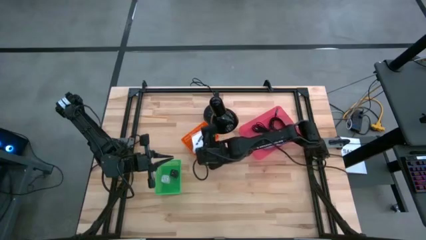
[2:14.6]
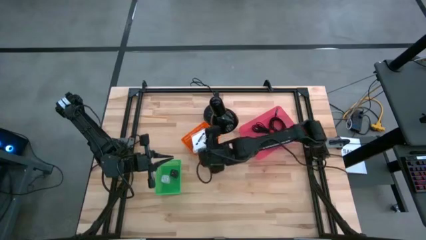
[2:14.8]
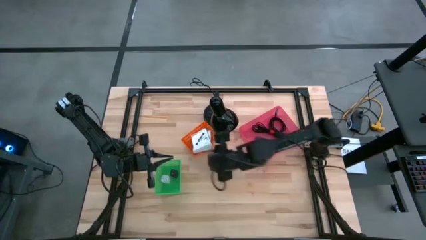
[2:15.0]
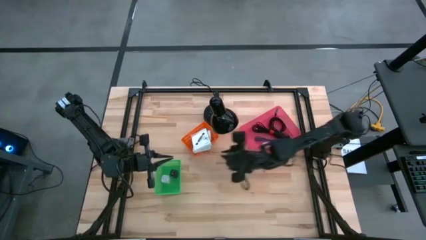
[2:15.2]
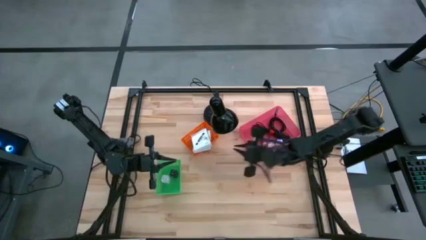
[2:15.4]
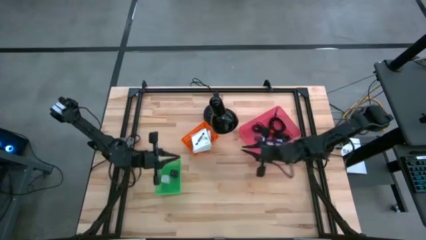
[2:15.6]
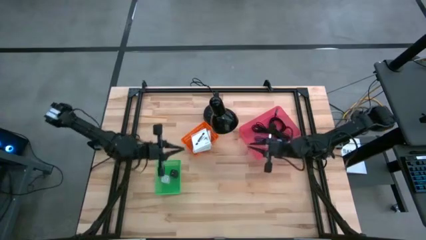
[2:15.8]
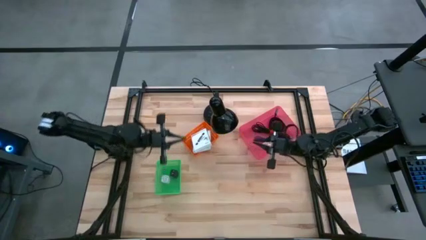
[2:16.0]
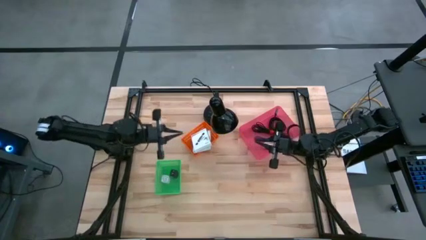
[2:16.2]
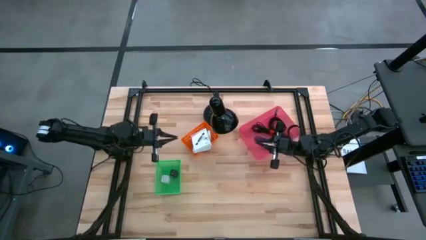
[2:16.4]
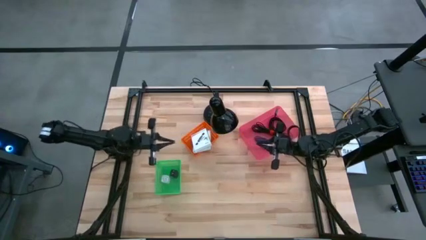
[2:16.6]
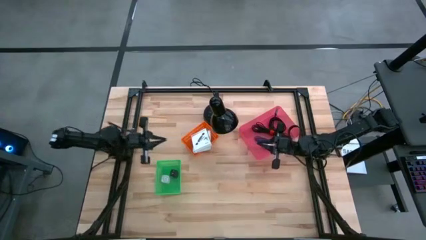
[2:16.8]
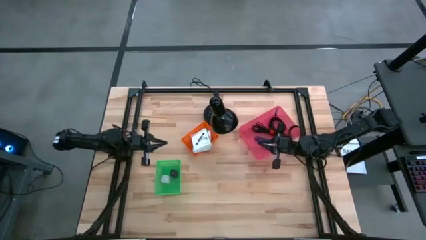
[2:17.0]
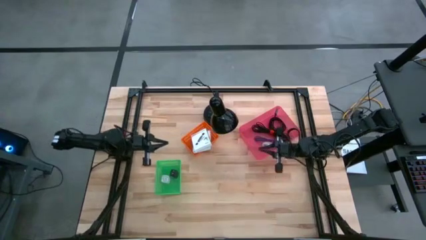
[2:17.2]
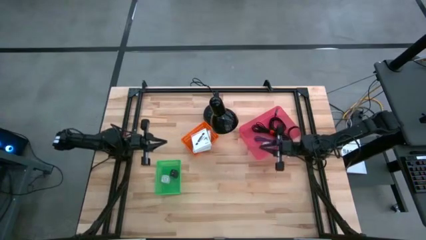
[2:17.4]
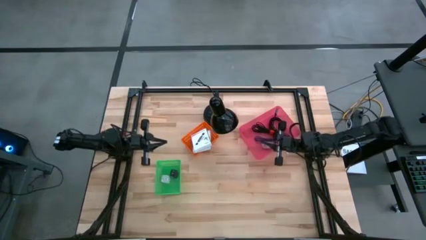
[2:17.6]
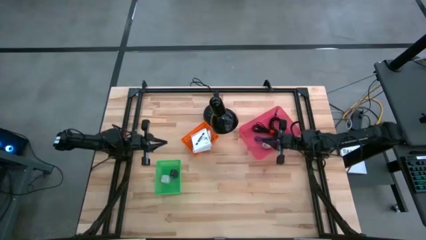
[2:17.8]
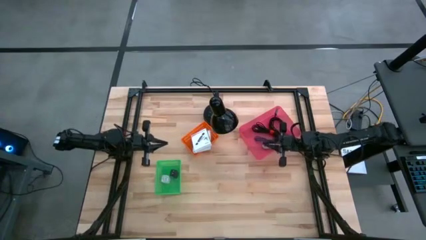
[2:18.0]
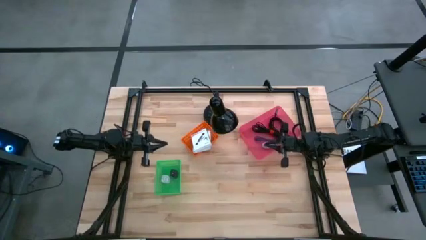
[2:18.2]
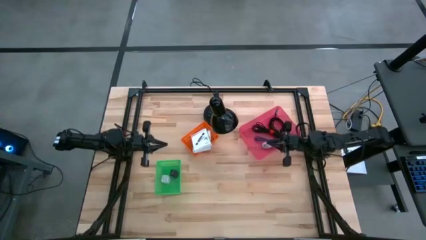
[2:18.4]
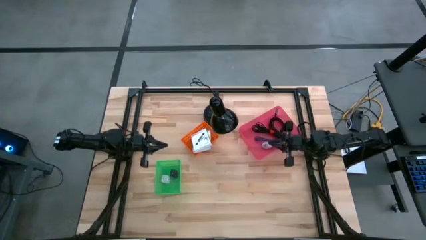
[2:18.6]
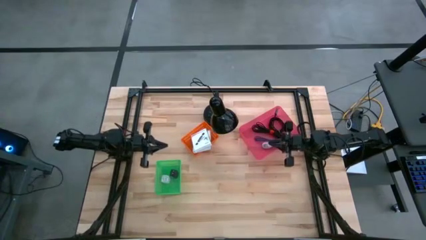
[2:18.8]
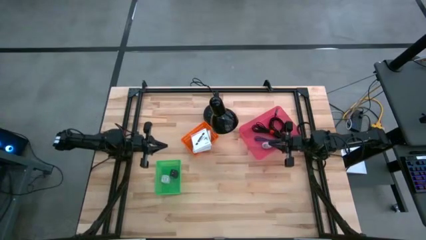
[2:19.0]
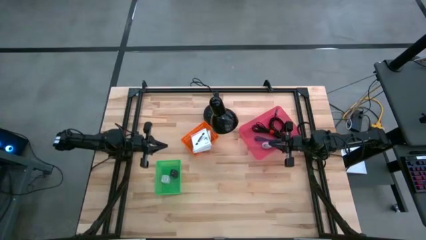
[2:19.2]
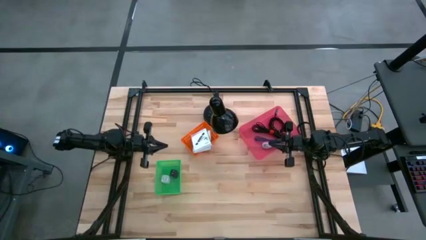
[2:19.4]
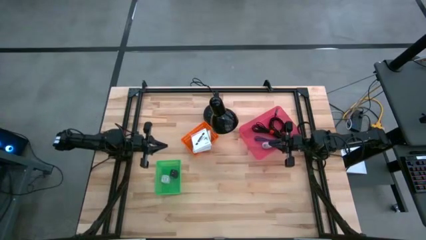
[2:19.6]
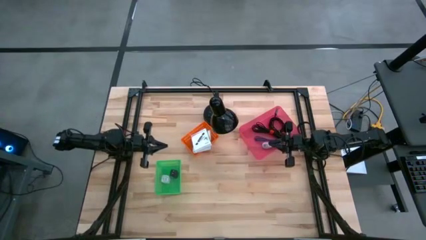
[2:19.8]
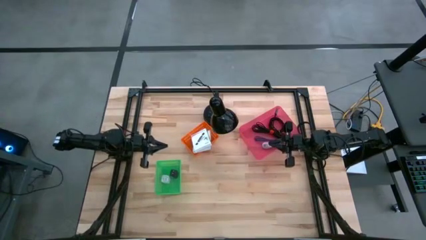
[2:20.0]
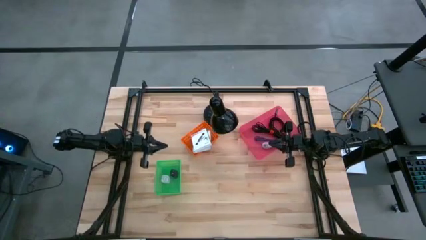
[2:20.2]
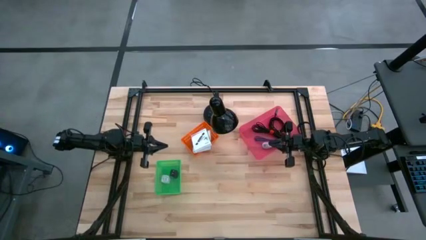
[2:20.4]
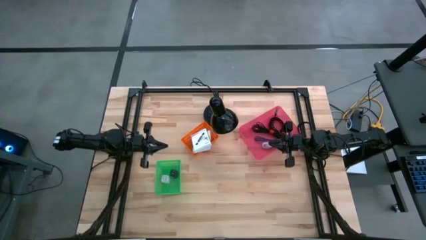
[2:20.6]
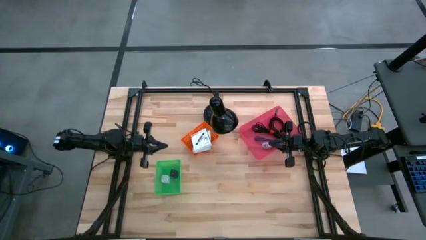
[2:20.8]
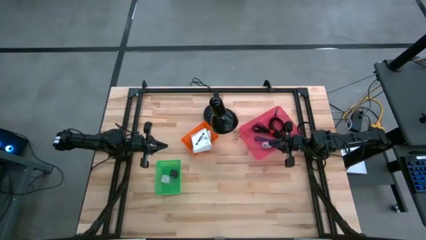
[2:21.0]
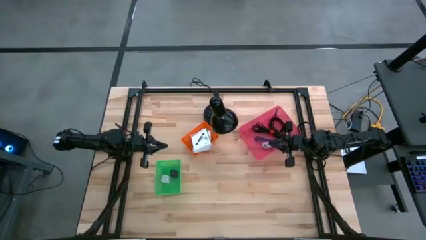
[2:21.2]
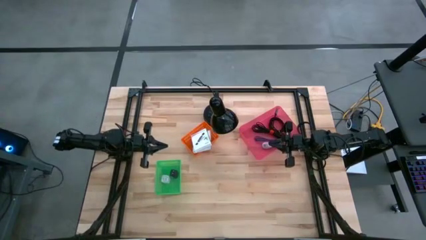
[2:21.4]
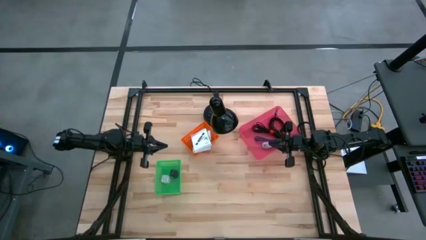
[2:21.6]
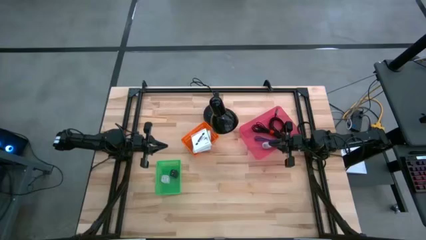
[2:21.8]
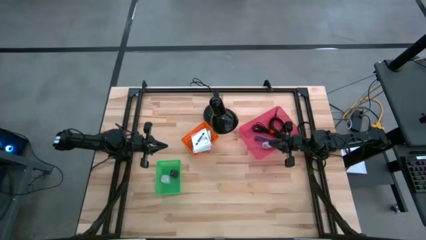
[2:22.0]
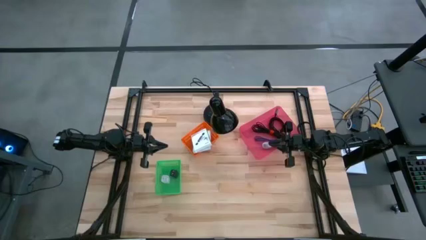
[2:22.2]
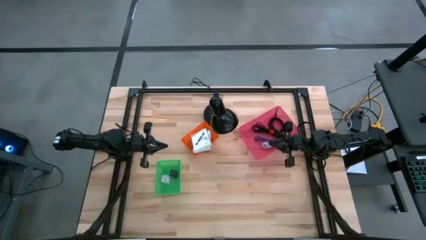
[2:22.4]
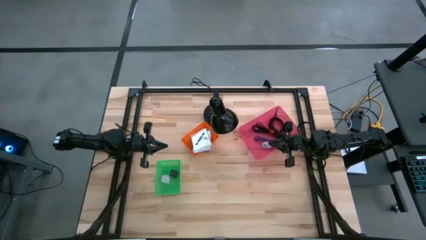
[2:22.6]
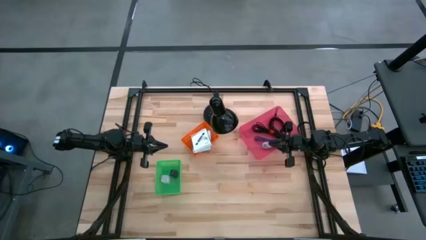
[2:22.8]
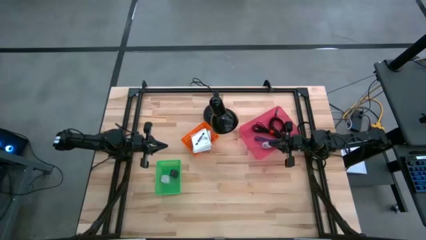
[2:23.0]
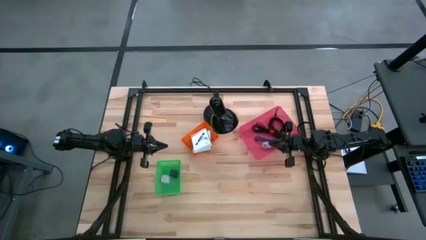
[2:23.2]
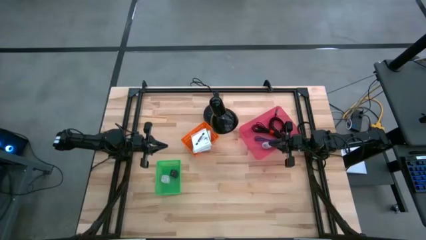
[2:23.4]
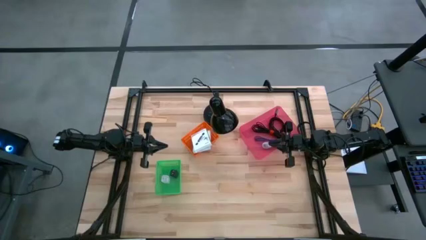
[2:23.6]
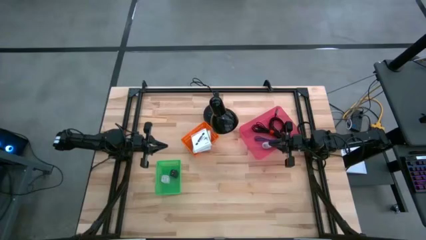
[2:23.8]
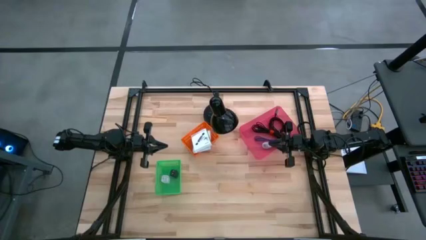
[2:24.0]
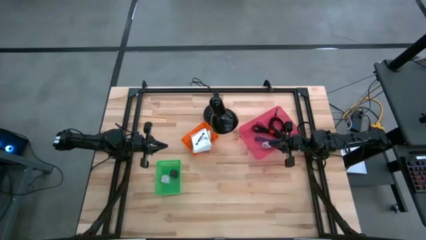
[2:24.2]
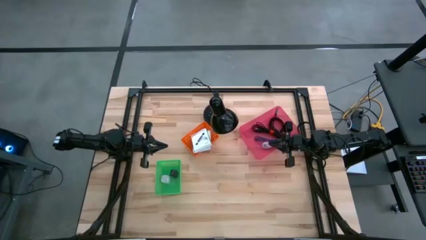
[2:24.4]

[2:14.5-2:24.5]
Task: Pick and place items into bin
Return to Home Position

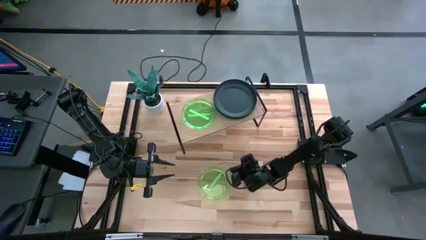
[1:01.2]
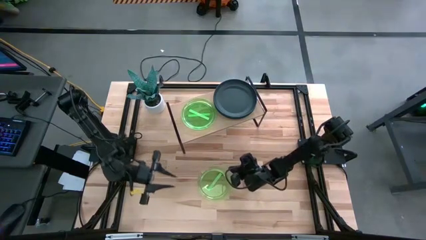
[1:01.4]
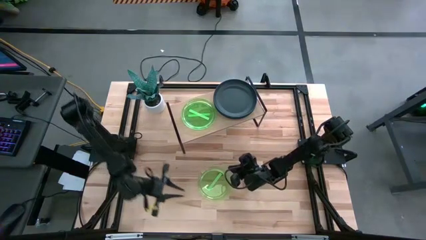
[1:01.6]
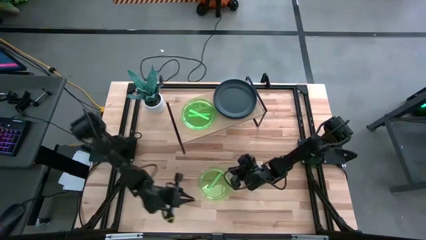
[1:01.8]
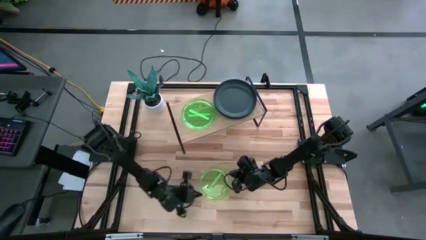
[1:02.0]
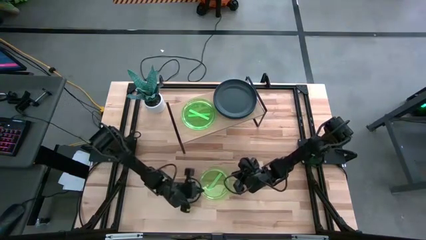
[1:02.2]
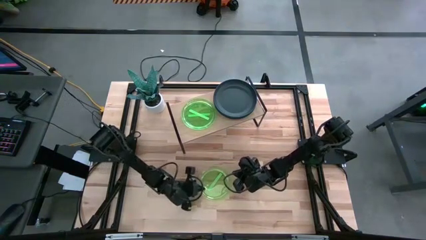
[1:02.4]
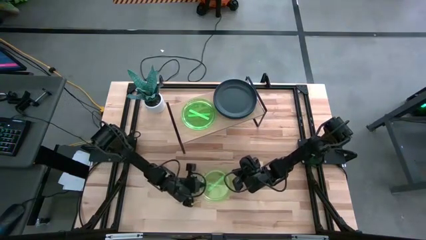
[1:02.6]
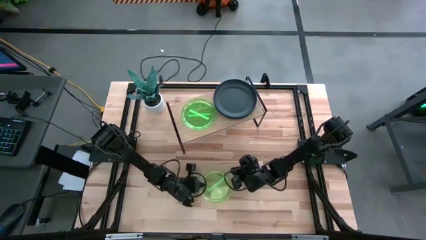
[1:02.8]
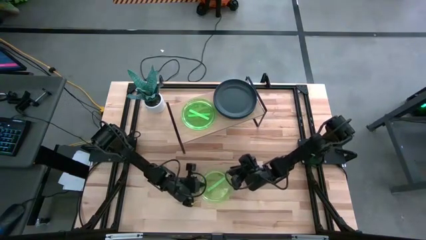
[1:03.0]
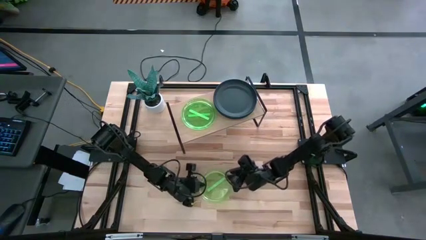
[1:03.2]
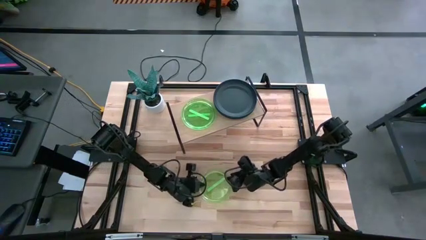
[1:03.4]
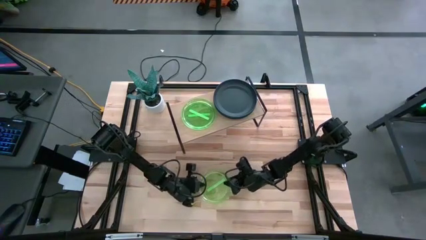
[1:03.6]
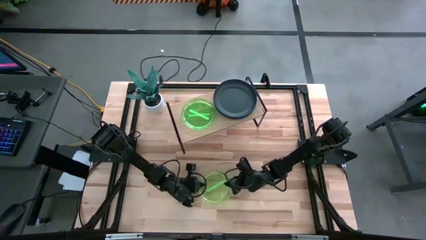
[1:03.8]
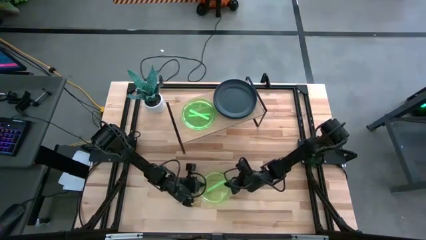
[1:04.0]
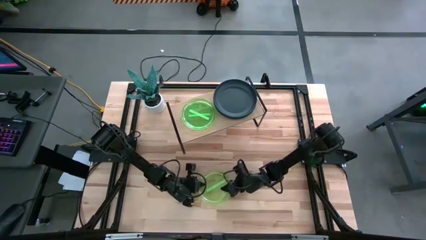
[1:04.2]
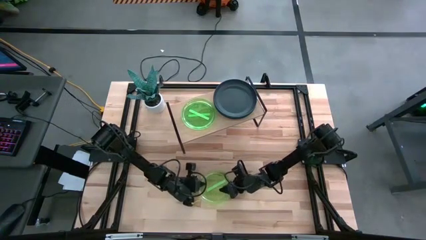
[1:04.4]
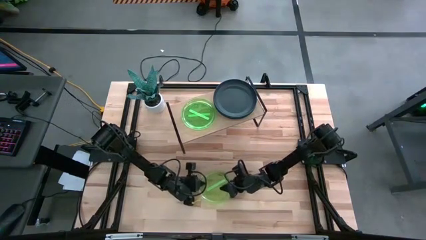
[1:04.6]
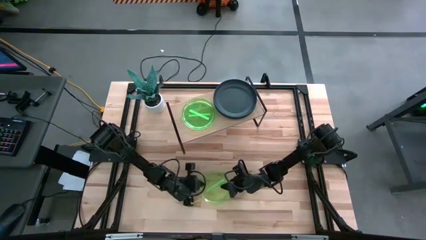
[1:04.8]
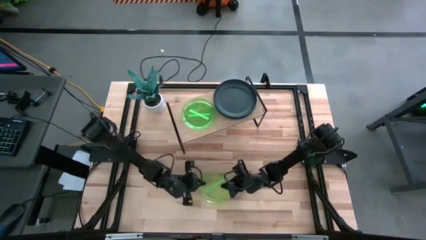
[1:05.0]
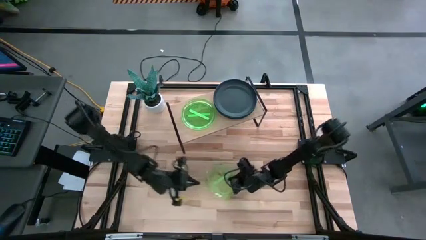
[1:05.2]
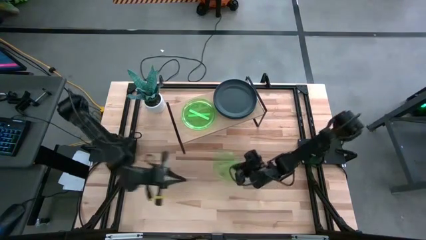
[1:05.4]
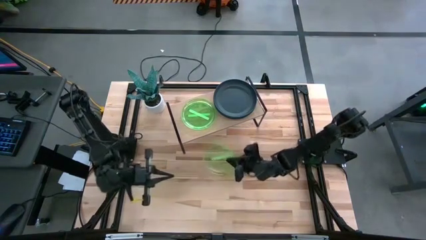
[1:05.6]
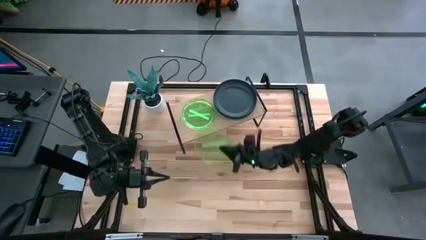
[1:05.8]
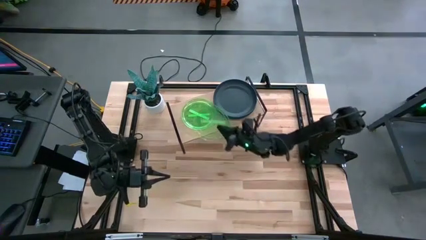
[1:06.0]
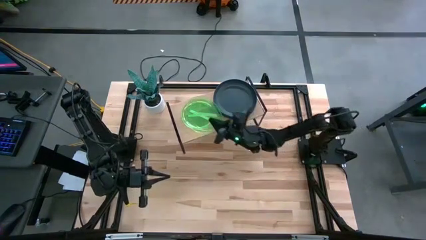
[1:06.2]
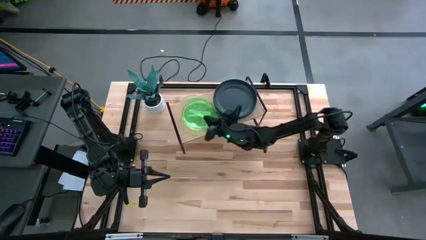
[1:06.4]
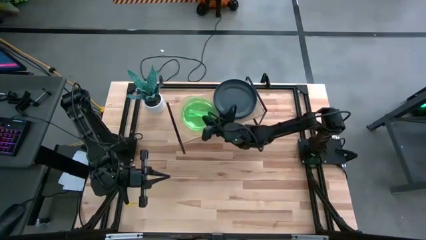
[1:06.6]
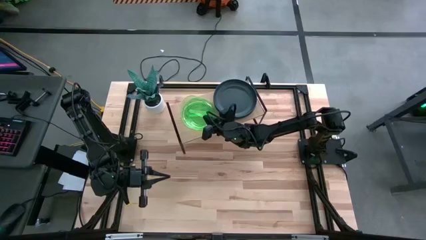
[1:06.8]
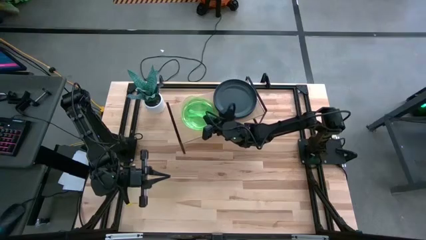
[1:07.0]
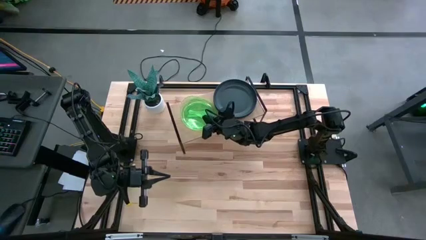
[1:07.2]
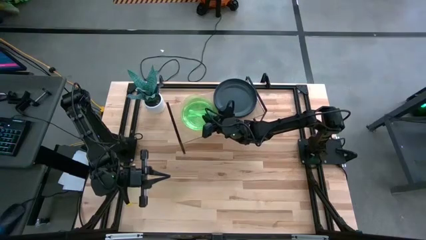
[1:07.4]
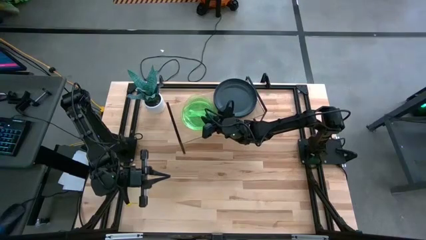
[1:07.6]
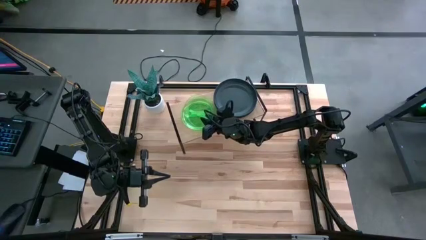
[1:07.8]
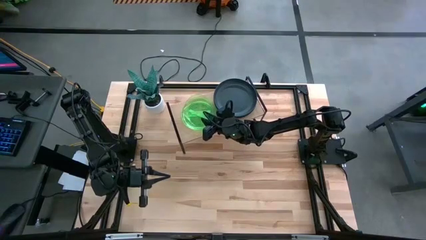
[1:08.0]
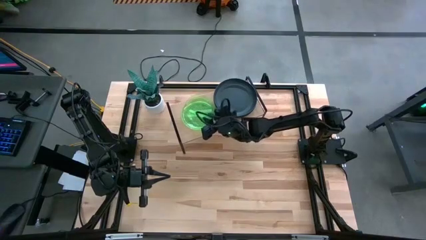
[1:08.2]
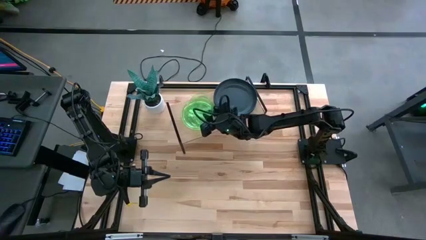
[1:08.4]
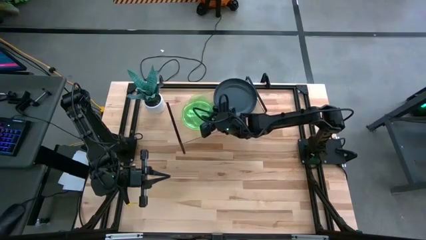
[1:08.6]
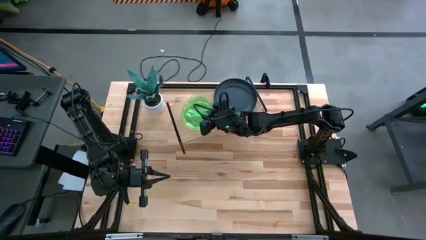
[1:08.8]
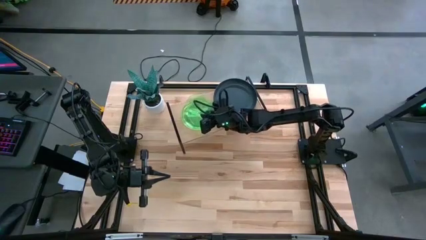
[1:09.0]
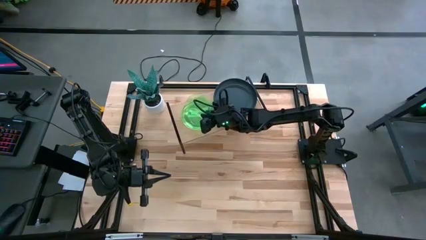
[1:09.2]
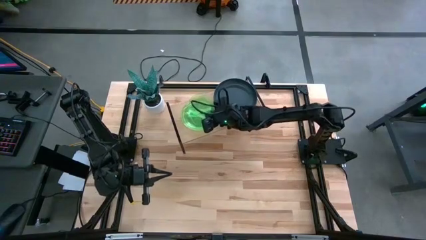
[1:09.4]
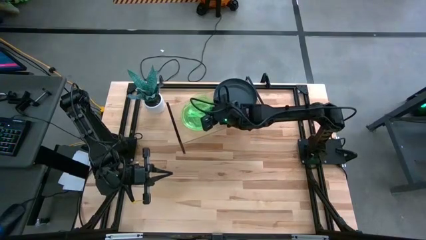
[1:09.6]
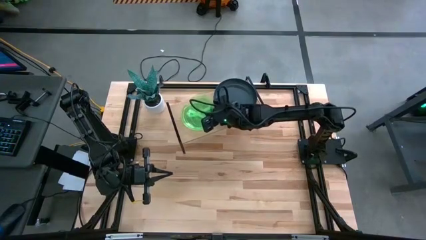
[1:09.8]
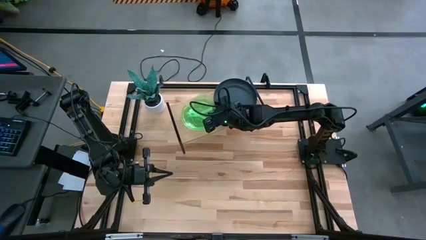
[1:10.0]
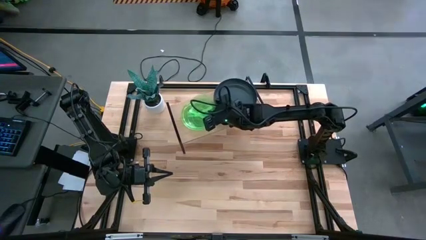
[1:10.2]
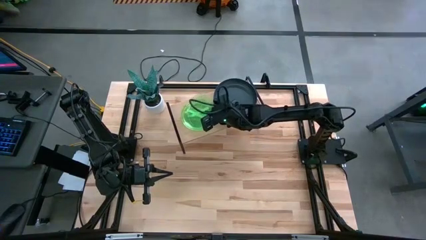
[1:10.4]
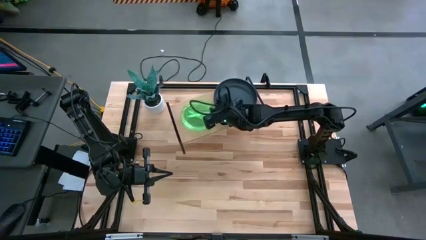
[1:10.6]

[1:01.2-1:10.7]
Task: Place and stack plates onto a shelf
Stack the green plate on top of the other green plates on the shelf
